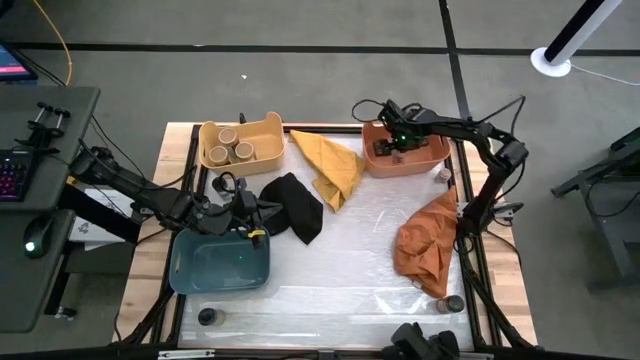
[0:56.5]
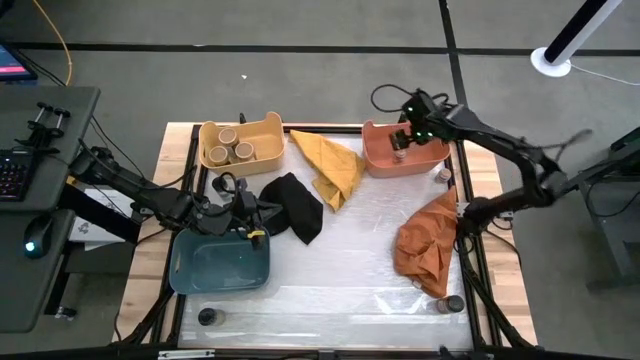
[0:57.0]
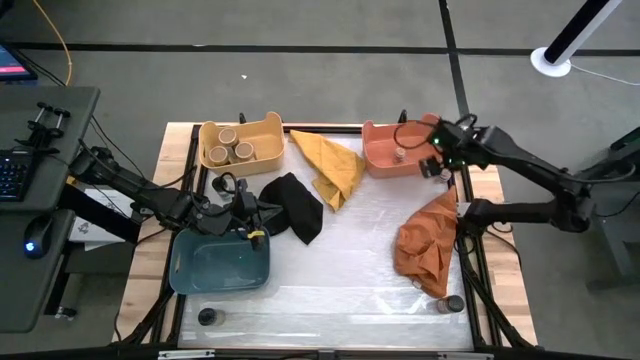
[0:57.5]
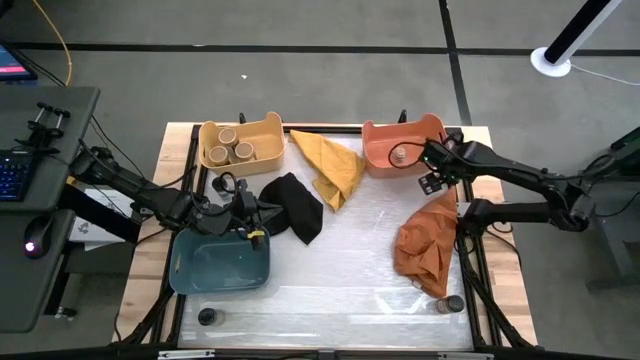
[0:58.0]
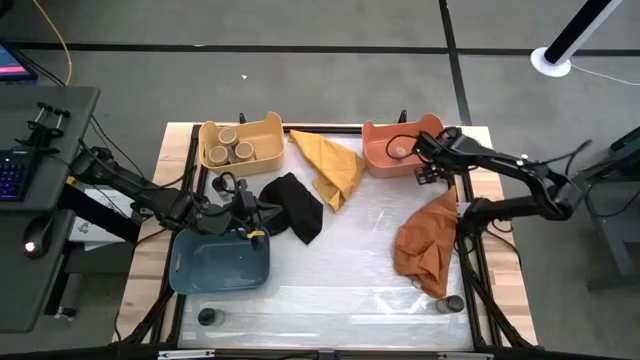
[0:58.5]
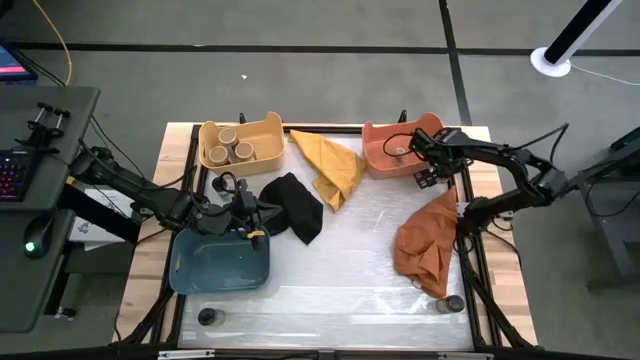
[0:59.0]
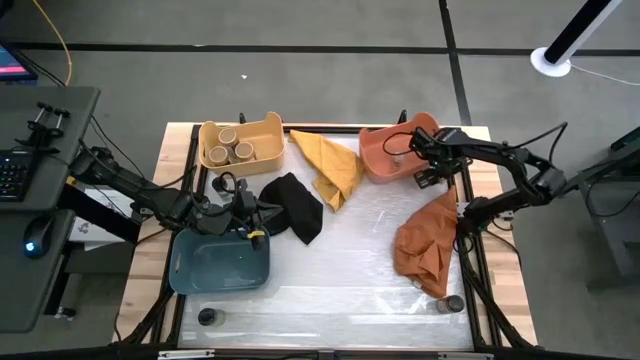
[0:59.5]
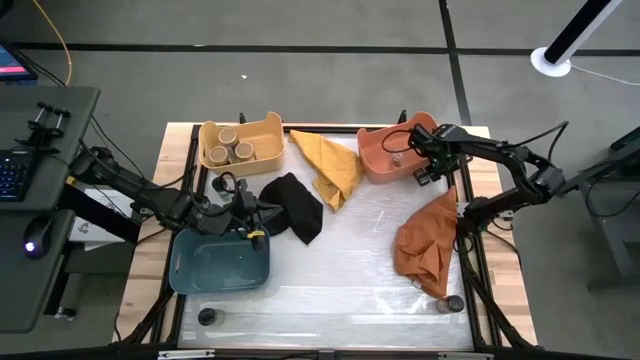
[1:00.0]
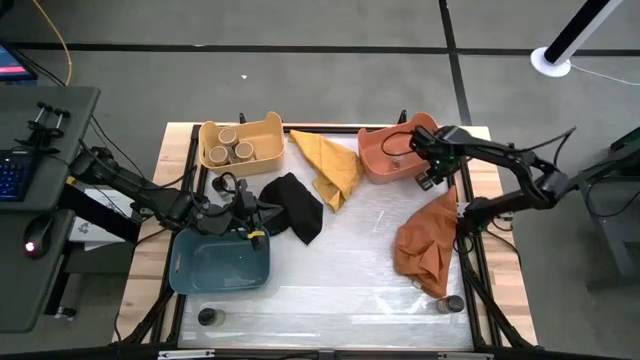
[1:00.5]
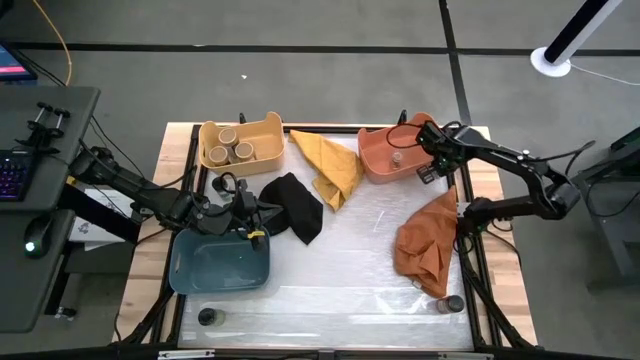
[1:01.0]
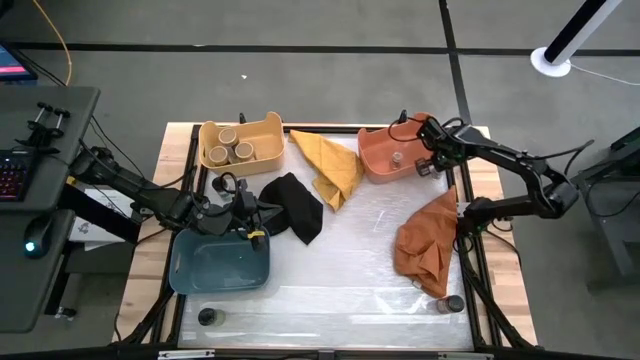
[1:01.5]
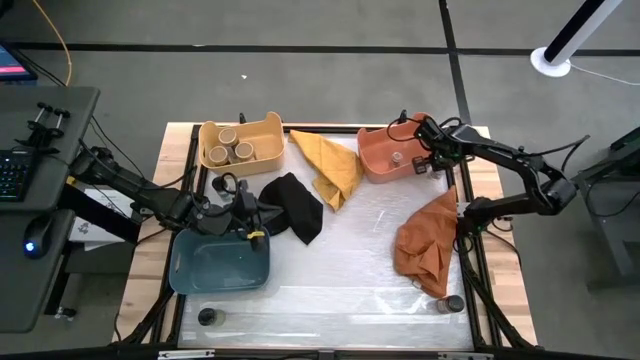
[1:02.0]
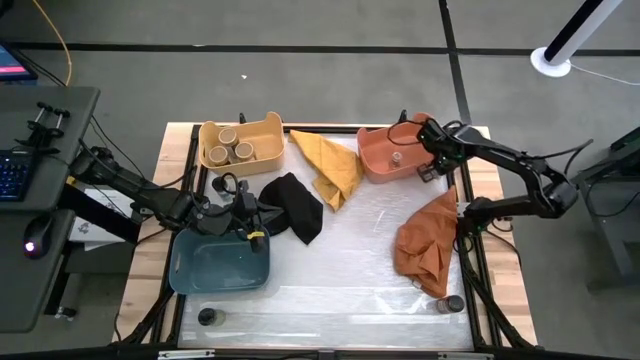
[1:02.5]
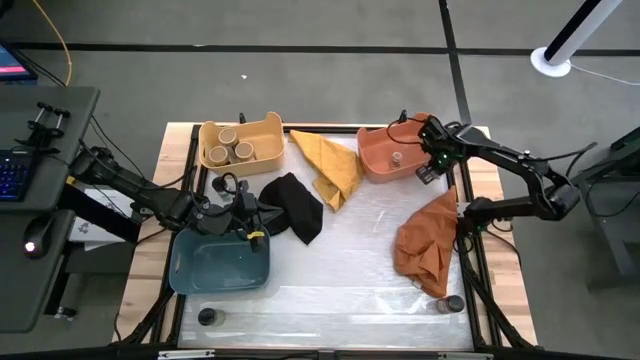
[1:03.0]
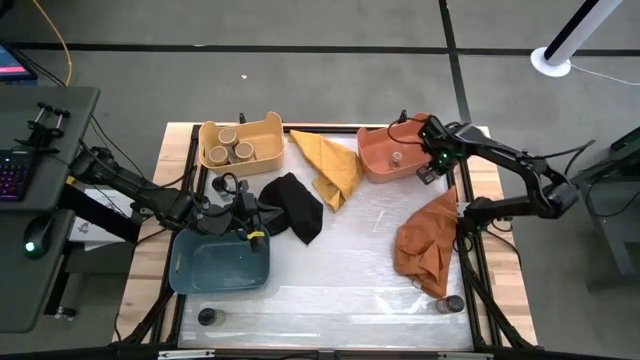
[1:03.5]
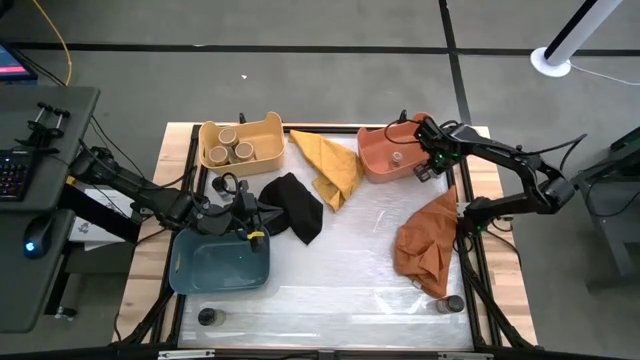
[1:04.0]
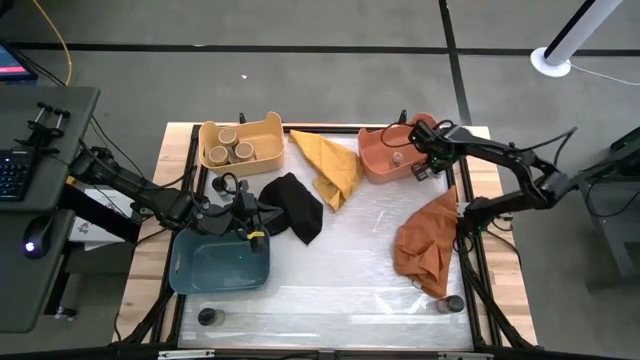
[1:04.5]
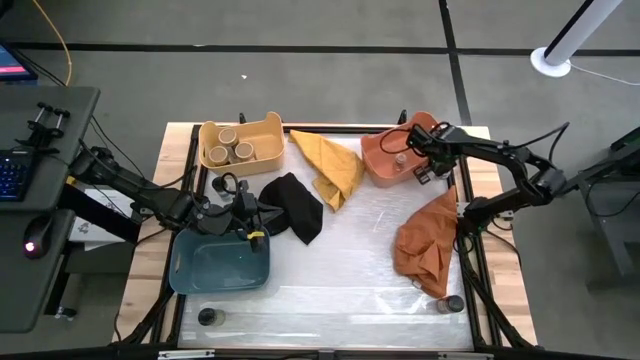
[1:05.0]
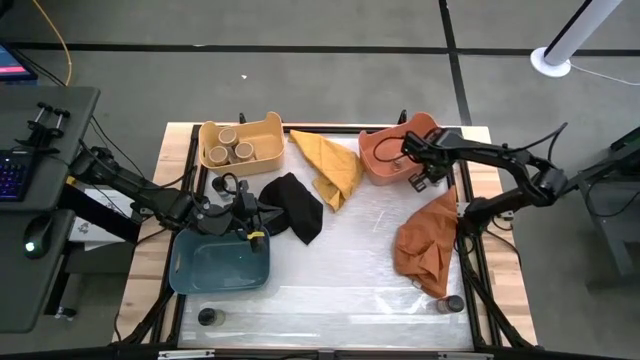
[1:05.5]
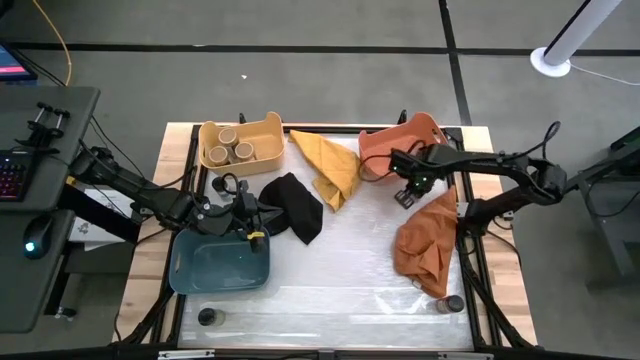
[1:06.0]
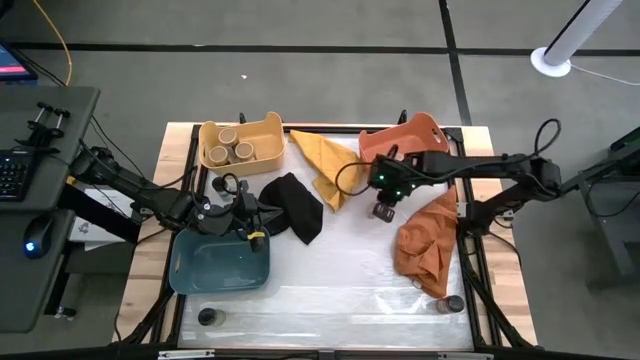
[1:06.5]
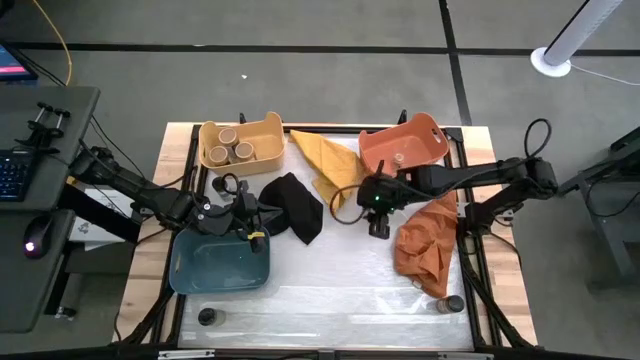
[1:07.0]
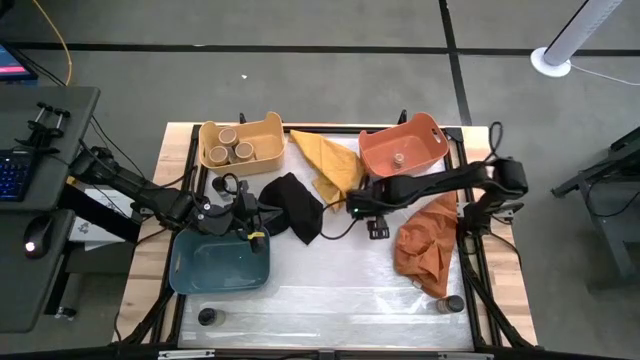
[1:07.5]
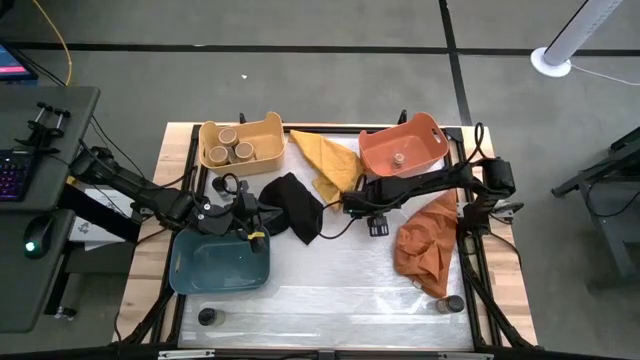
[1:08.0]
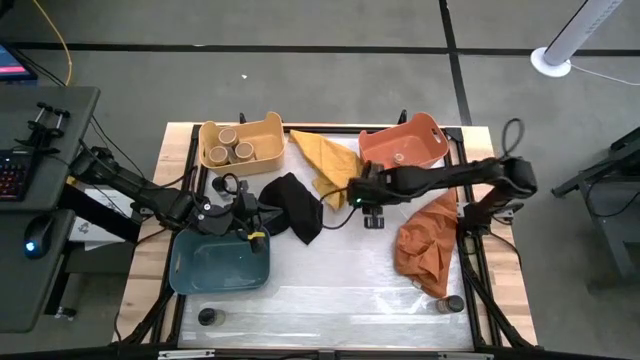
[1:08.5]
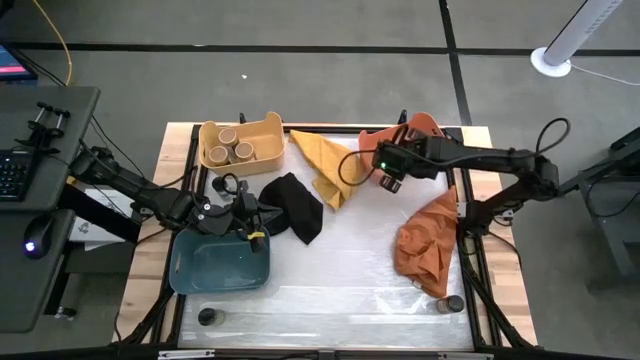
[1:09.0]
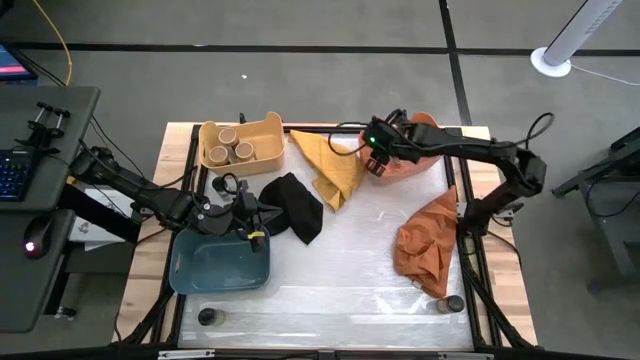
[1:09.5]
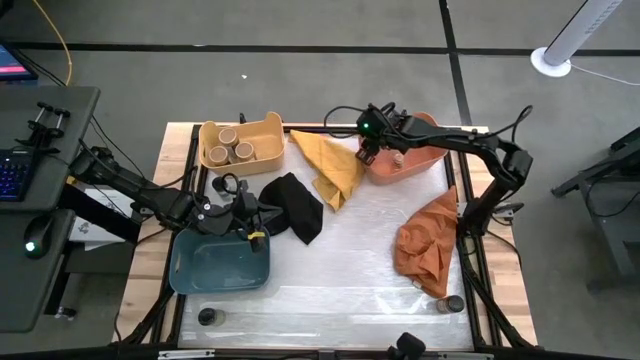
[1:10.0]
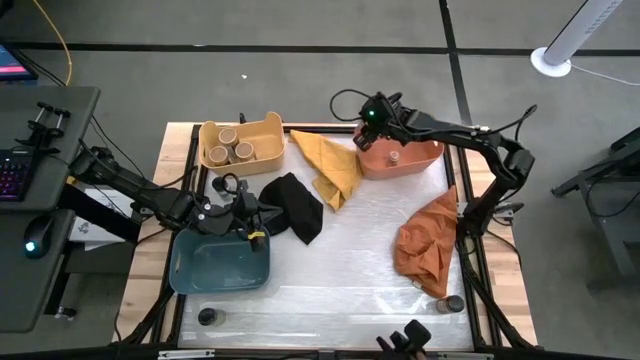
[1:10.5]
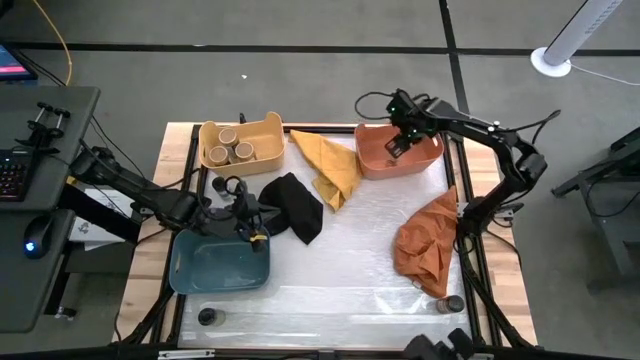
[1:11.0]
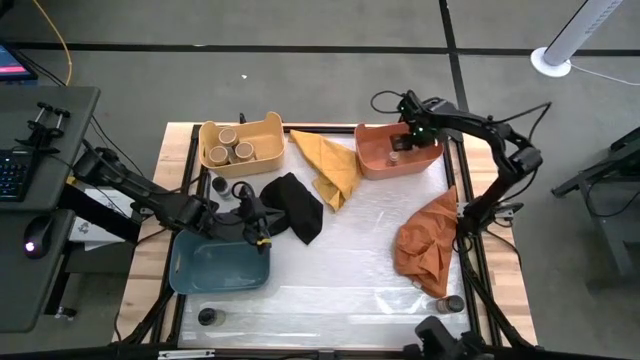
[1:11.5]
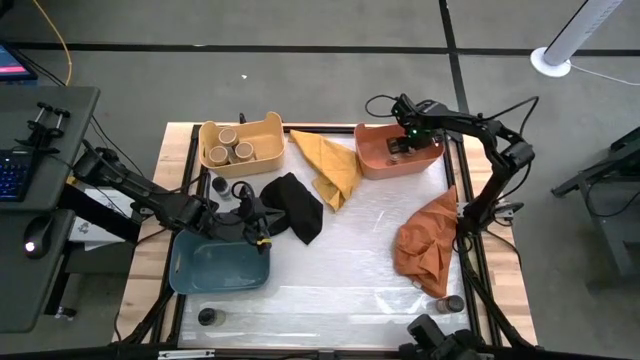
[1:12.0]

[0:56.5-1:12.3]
Task: Sort spices by type
Put the brown spice bottle into the orange bin

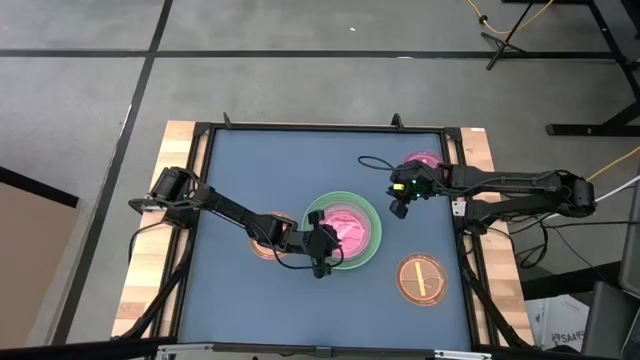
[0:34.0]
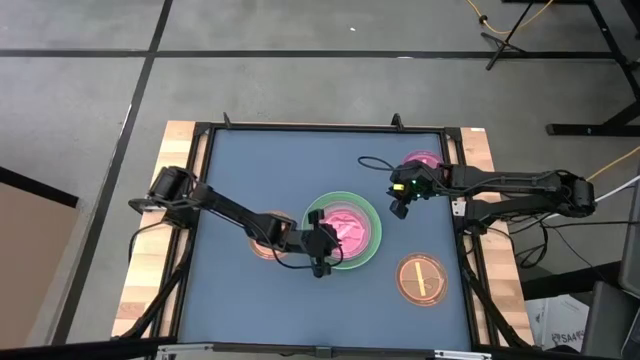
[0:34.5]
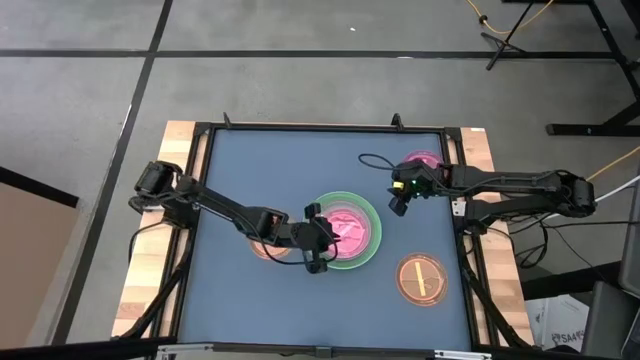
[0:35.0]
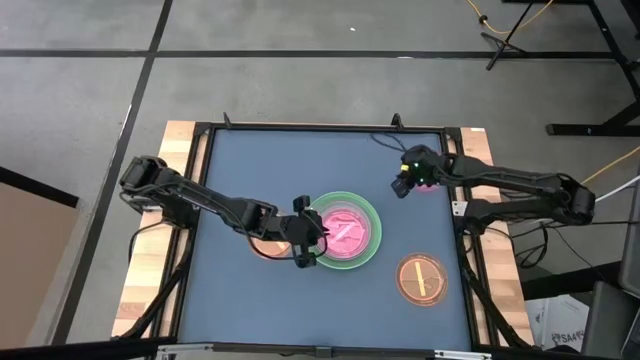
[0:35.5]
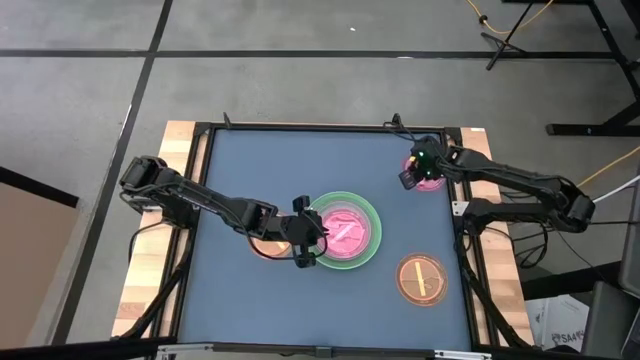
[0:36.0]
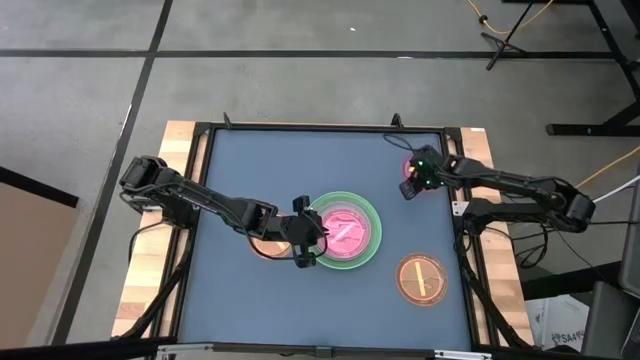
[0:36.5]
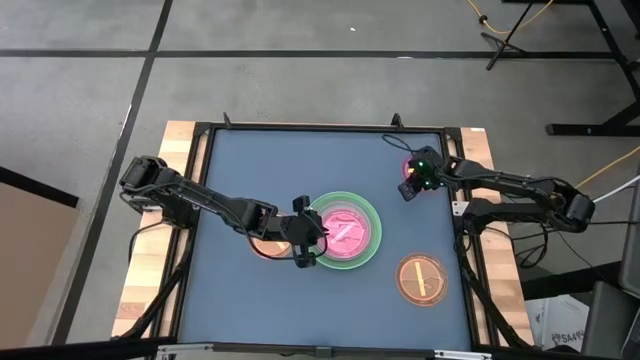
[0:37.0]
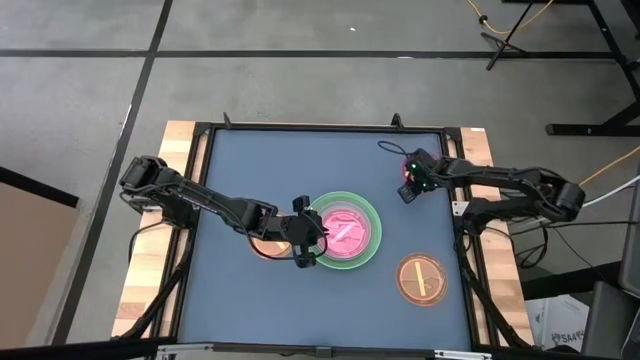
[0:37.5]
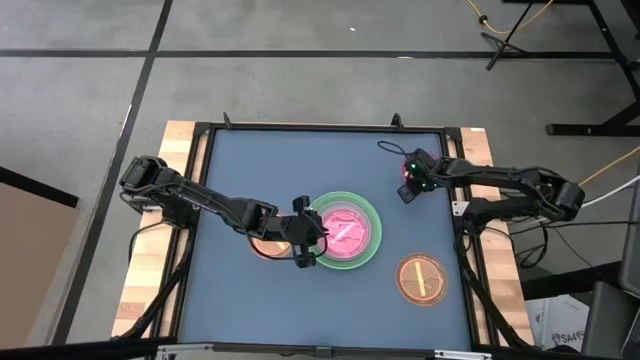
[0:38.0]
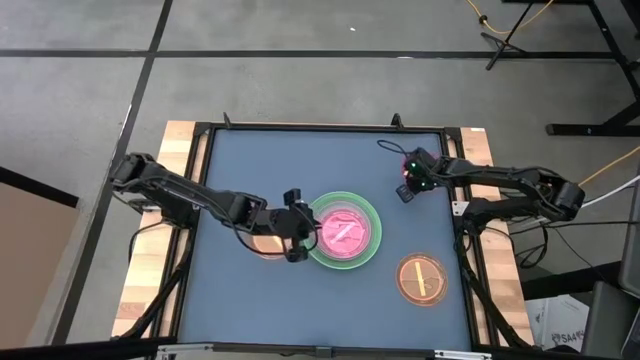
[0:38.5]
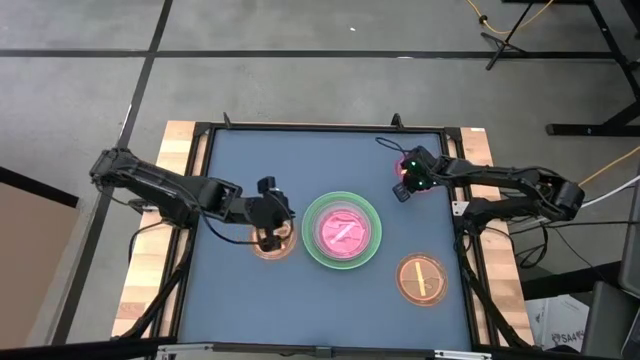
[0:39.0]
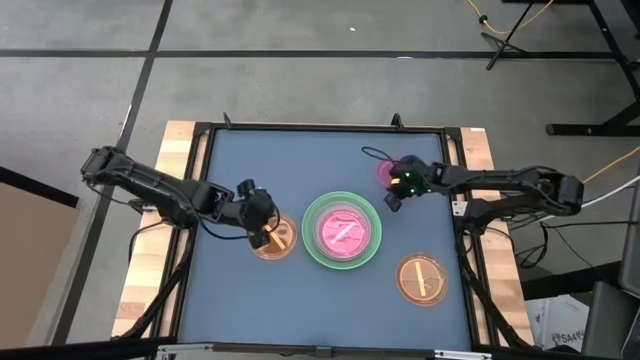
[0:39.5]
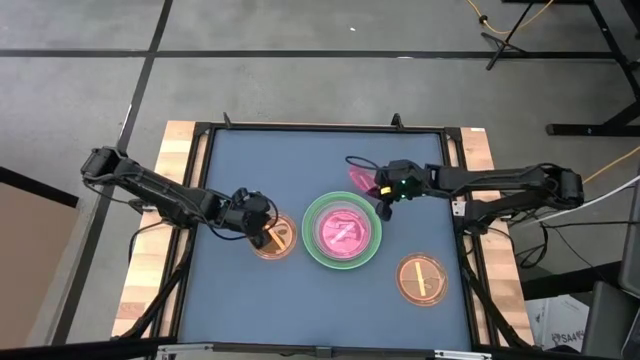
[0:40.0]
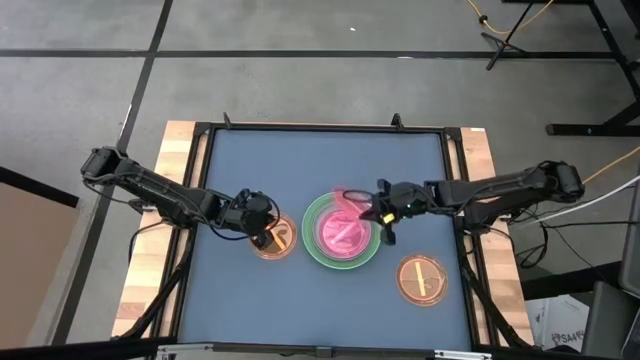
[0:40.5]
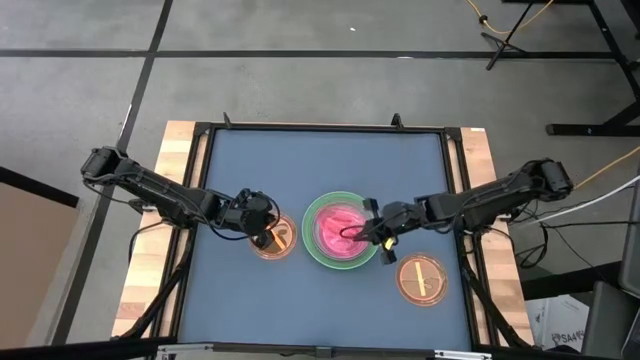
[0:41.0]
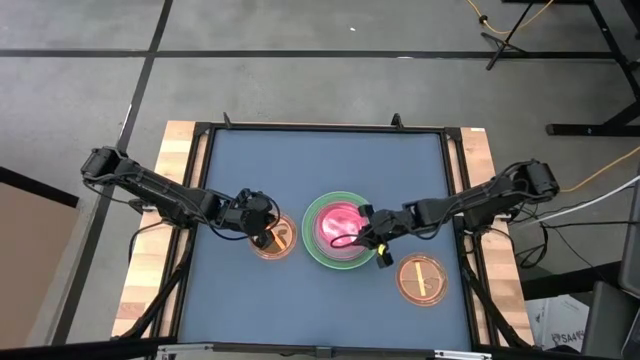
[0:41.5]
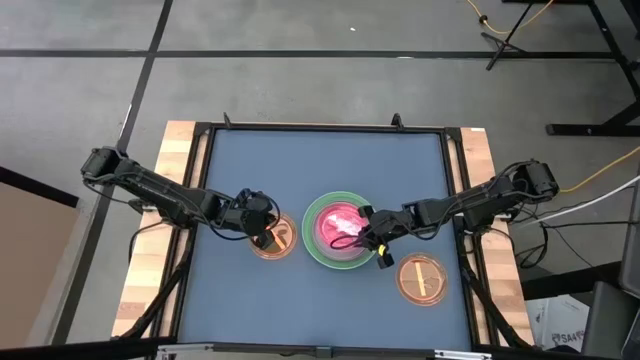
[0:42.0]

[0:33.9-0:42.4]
Task: Stack plastic plates
Stack the light pink plate on top of the light pink plate
